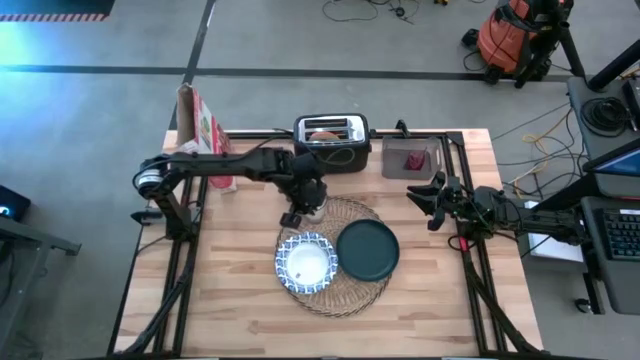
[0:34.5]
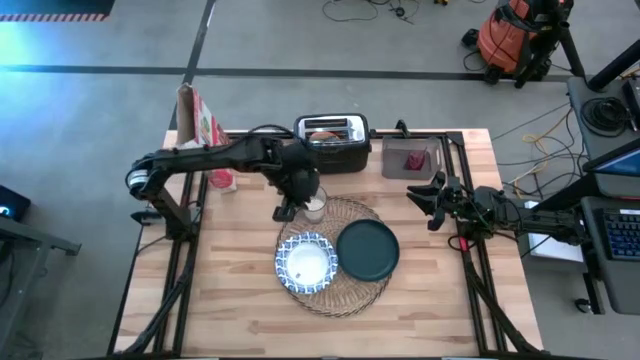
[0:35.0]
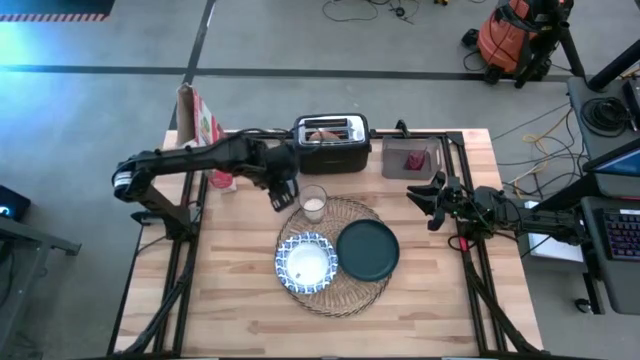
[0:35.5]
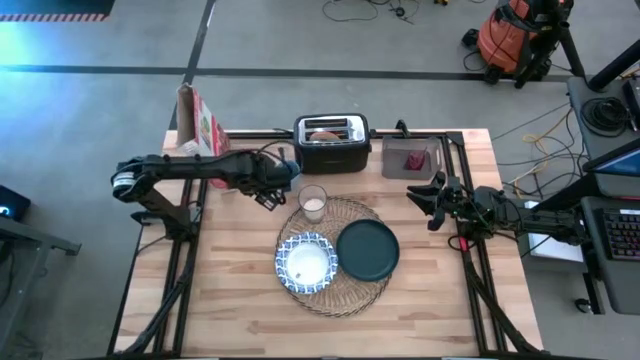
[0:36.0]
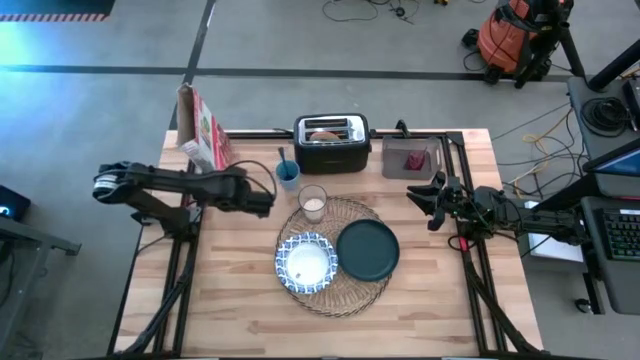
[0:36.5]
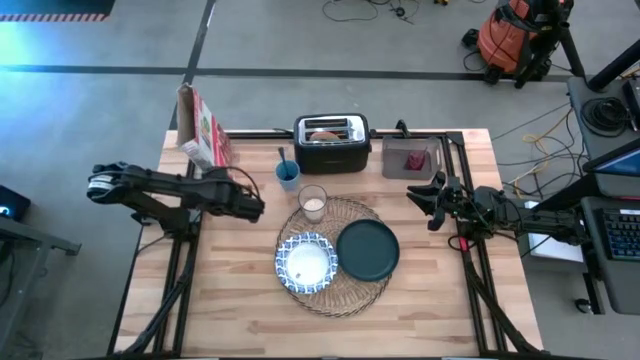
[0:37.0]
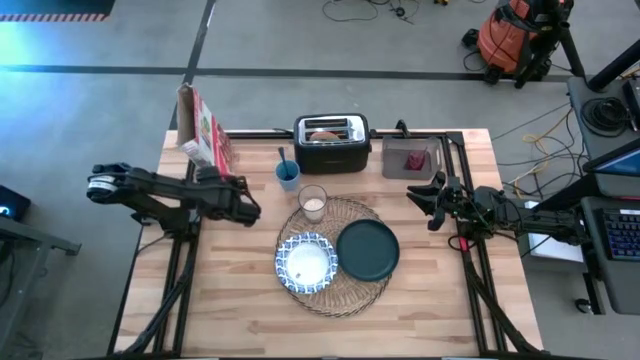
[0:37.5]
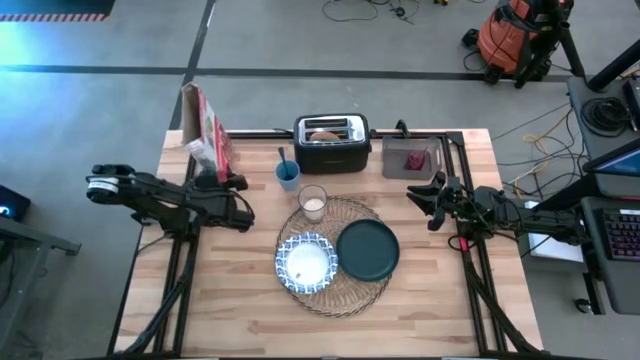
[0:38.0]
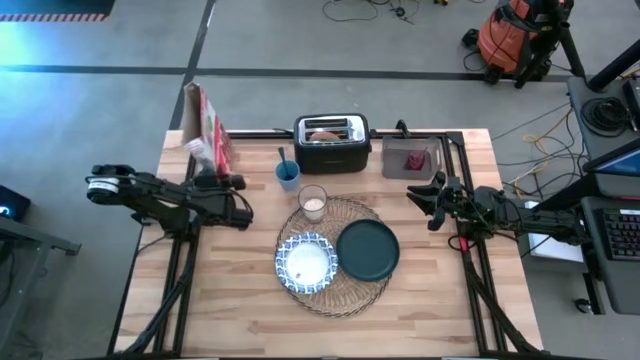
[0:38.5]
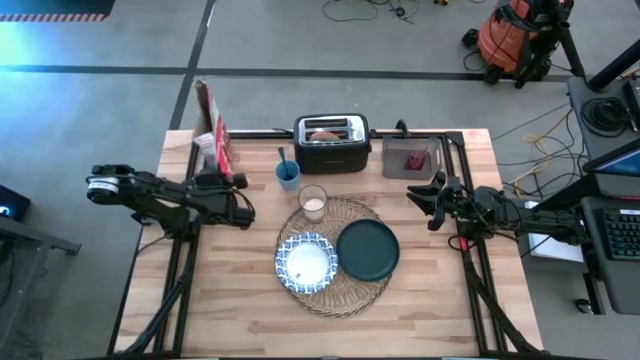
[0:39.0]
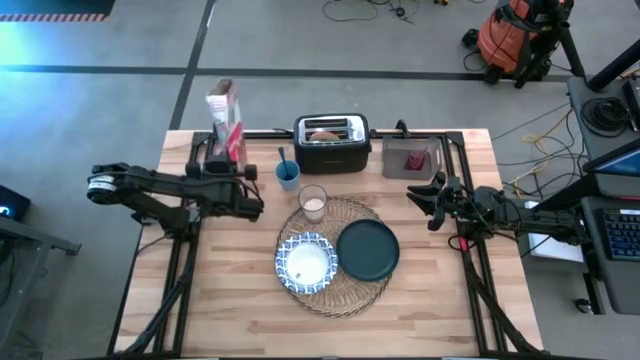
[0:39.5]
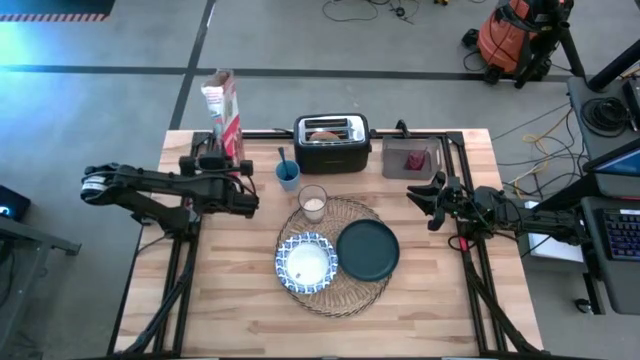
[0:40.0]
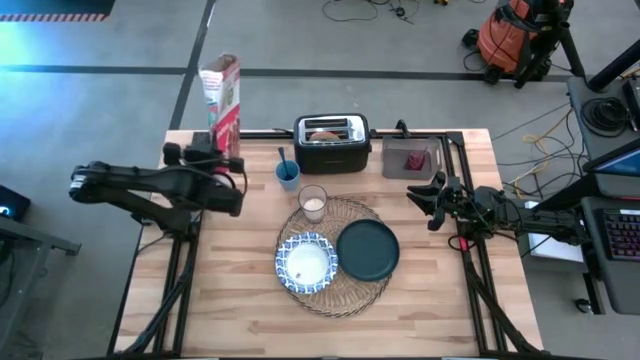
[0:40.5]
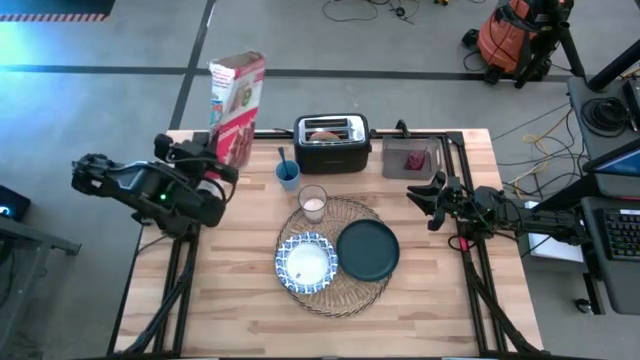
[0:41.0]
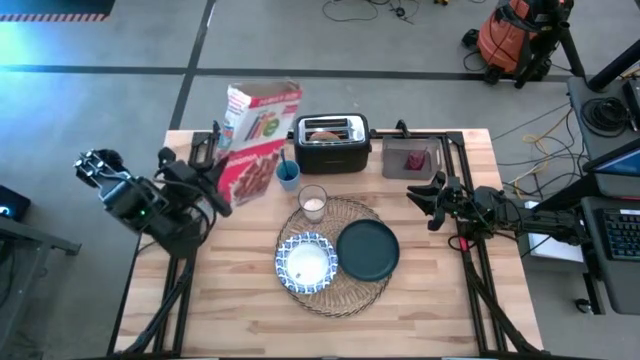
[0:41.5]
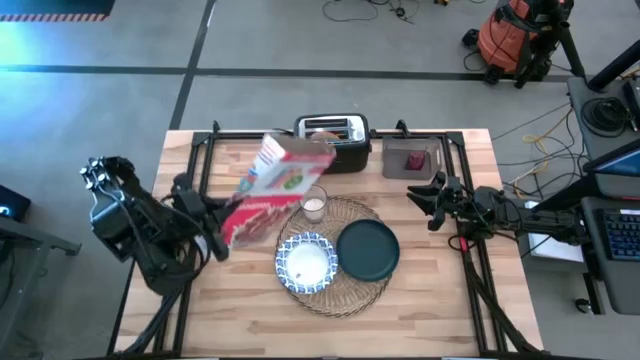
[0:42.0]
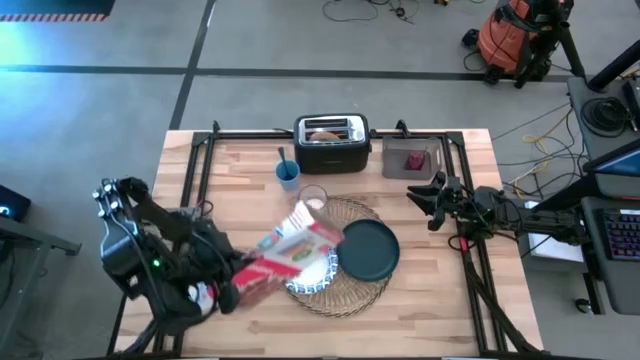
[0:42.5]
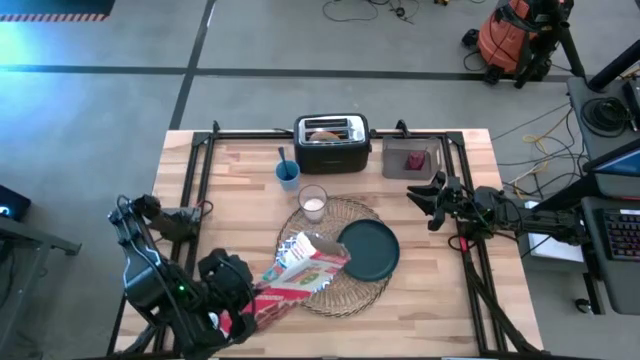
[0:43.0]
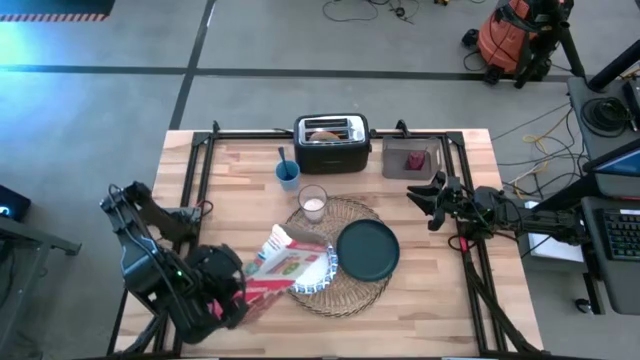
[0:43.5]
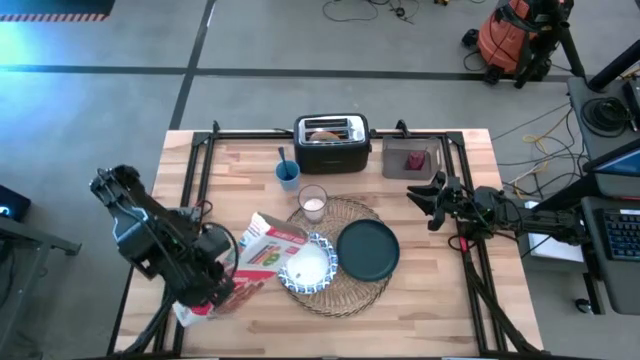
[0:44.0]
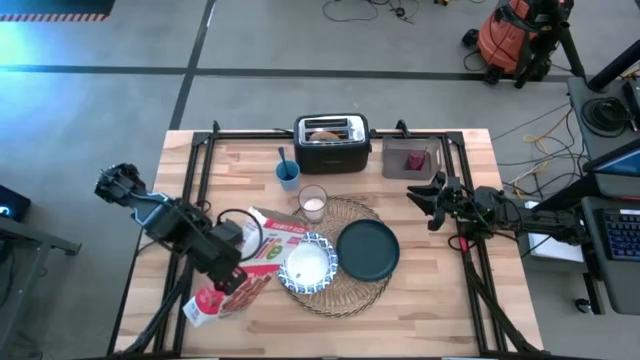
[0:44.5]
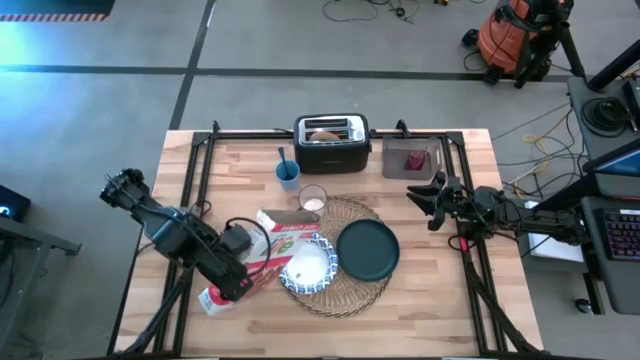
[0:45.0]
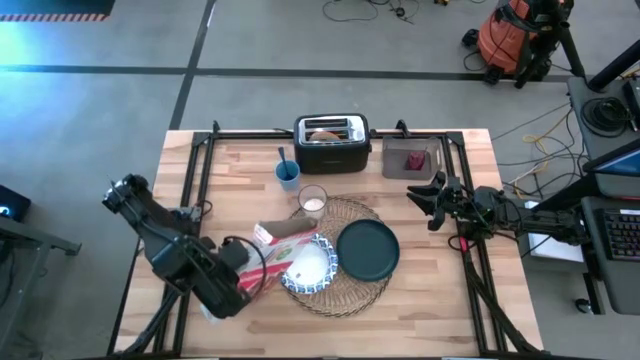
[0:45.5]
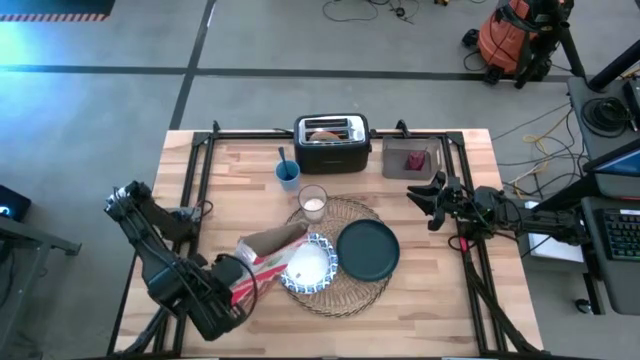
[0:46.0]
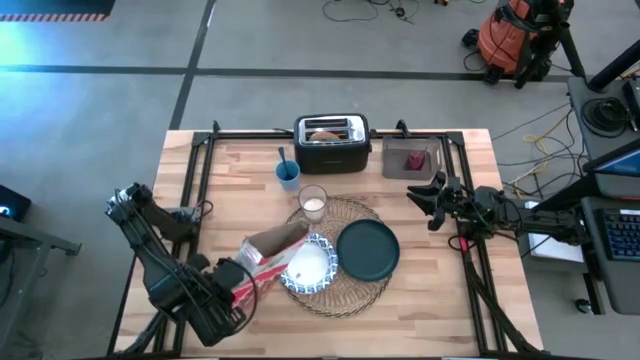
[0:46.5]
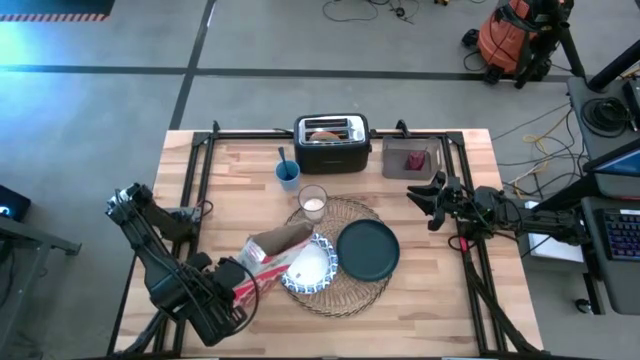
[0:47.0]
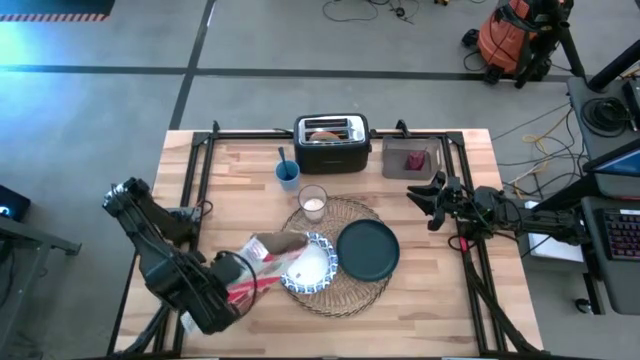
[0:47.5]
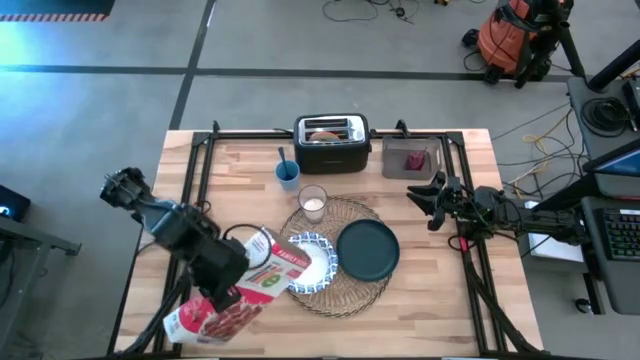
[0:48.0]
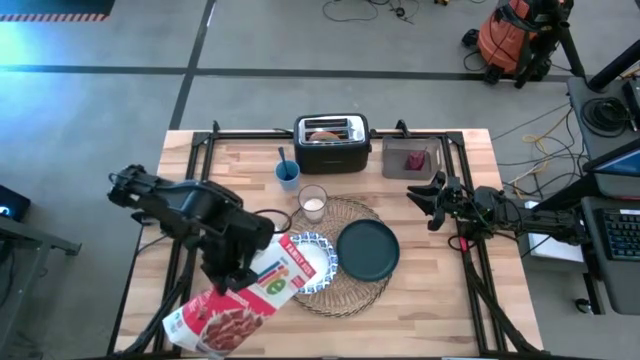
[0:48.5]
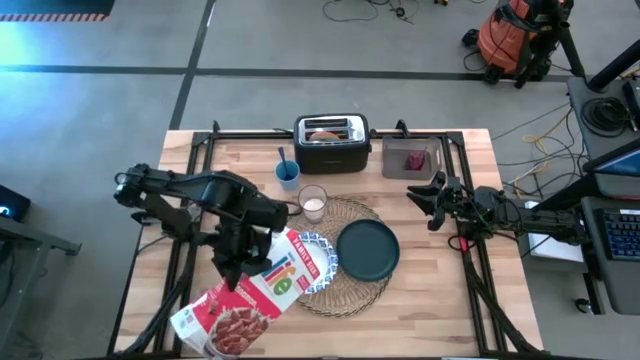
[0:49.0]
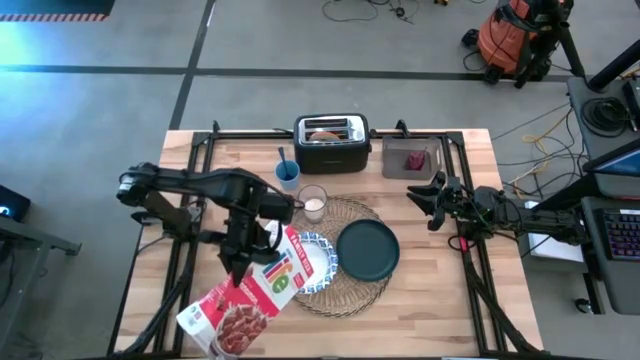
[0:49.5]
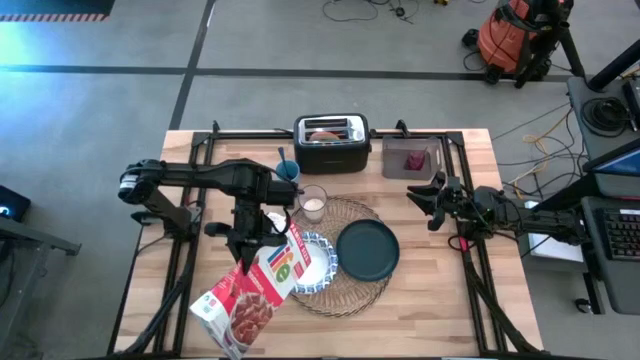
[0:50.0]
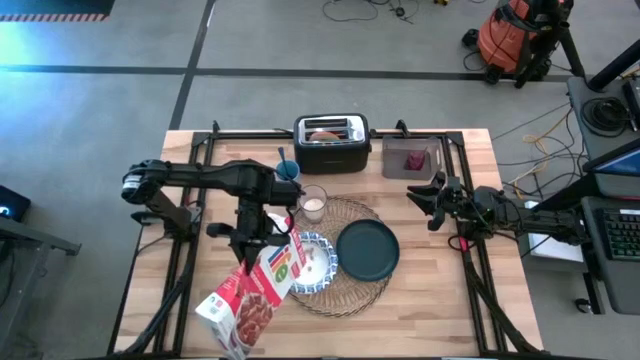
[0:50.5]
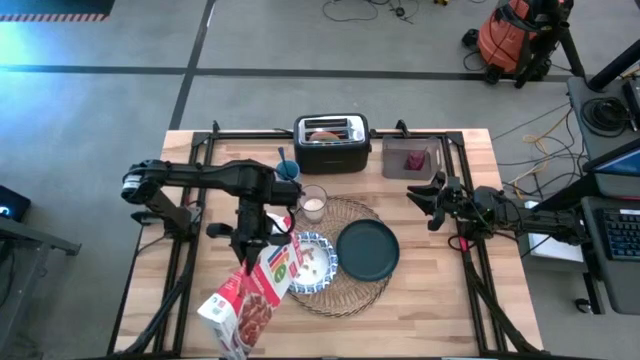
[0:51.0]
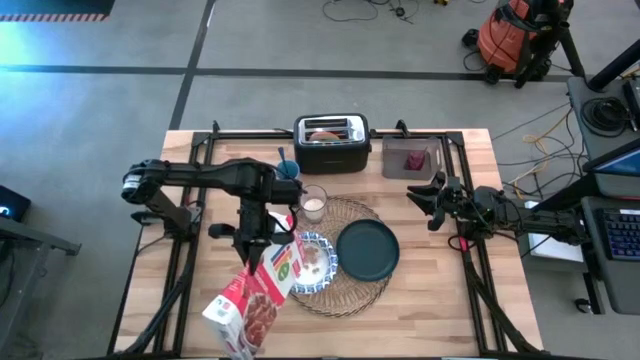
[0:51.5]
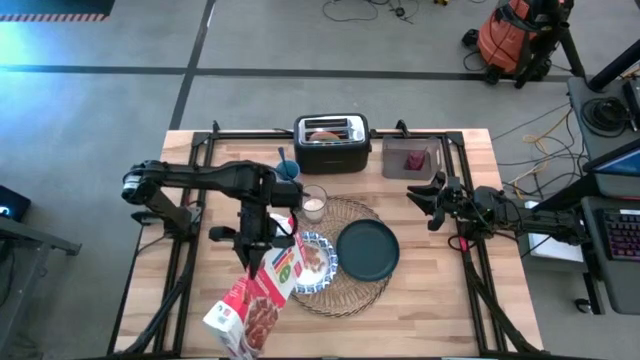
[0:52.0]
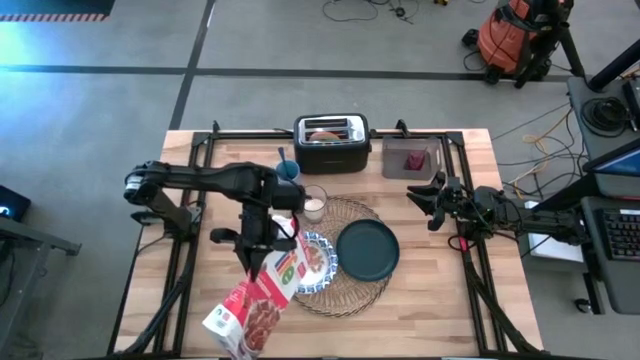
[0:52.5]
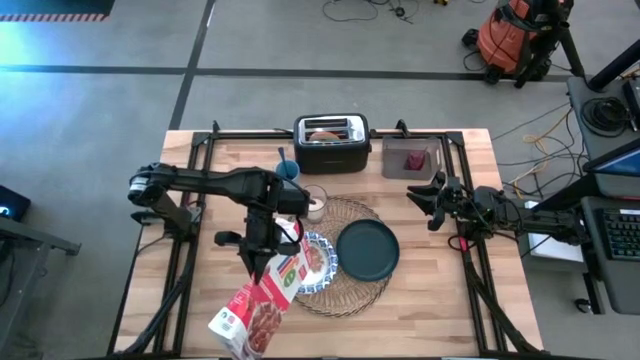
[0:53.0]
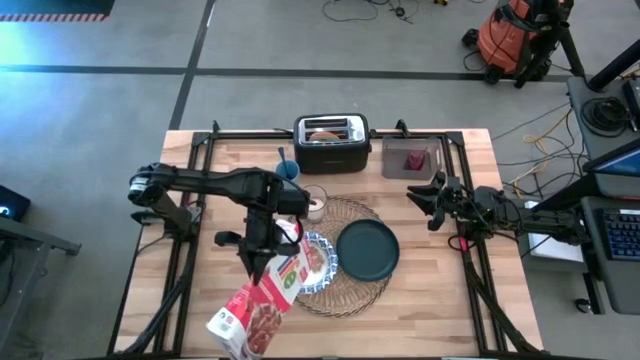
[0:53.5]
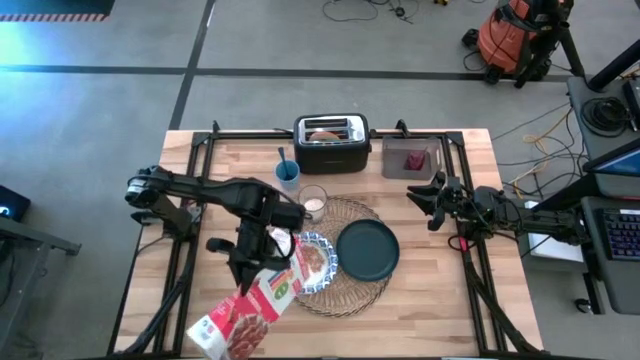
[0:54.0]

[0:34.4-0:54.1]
Task: Arrange a breakfast setting
Pour the cereal from the red cereal box into the white bowl

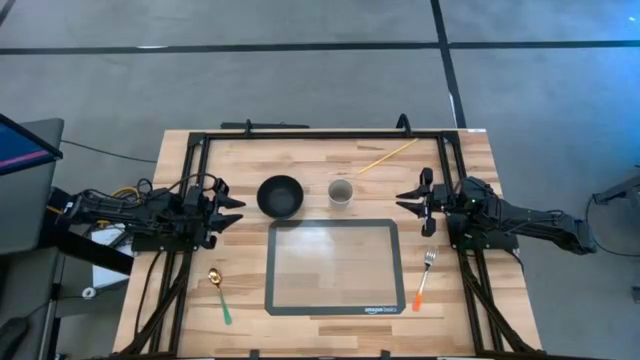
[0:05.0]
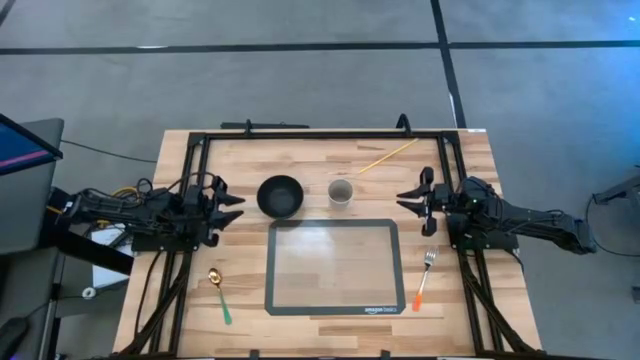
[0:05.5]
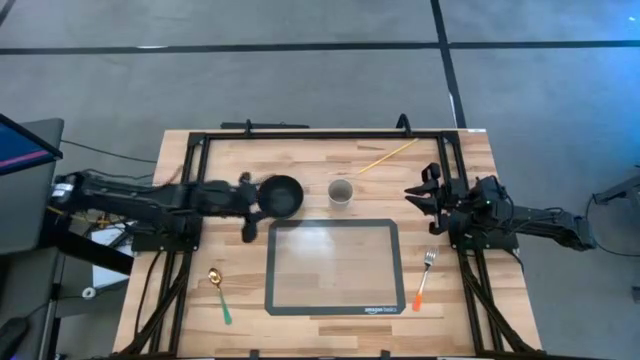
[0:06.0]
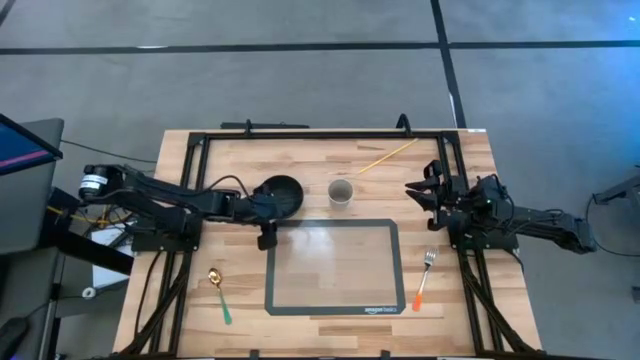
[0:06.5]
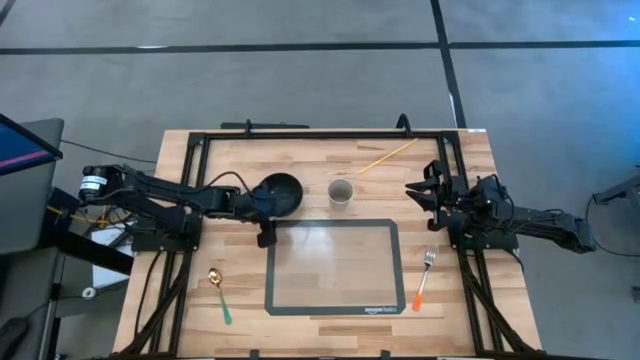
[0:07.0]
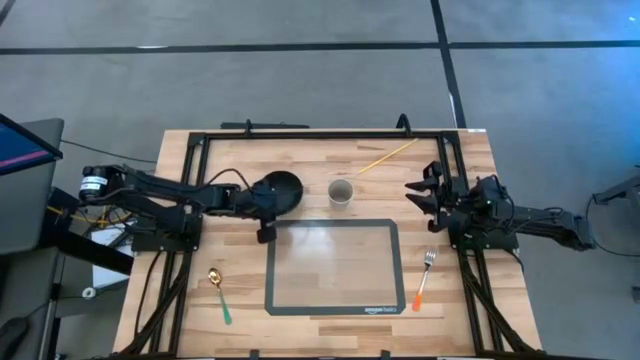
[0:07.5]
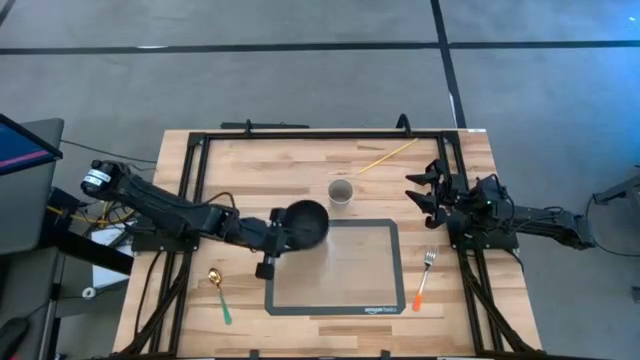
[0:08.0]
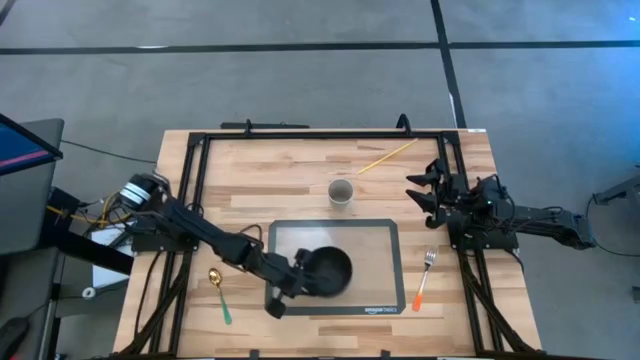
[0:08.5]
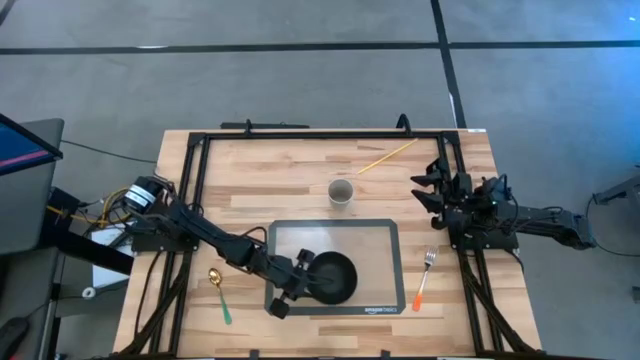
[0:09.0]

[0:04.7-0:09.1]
Task: Pick & Place Utensil
Put the black bowl on the transparent mat
